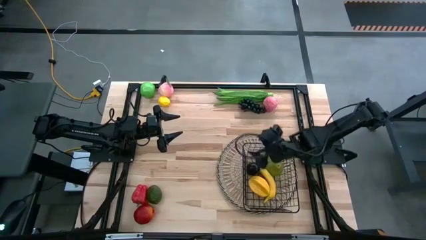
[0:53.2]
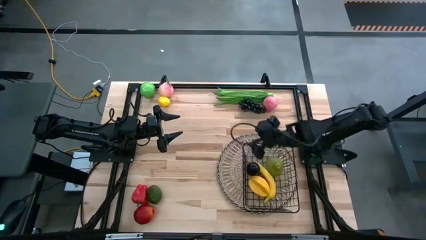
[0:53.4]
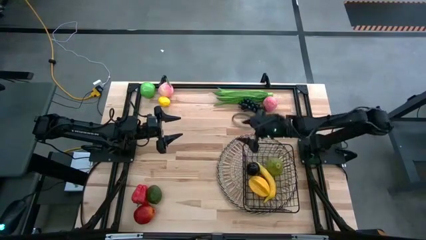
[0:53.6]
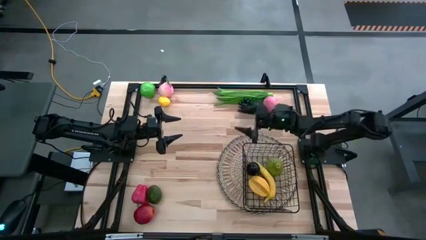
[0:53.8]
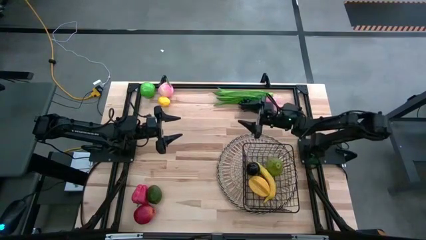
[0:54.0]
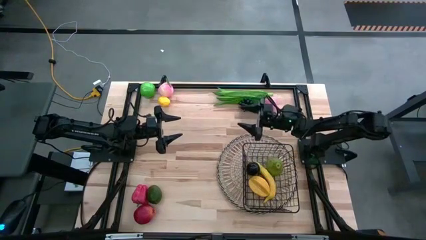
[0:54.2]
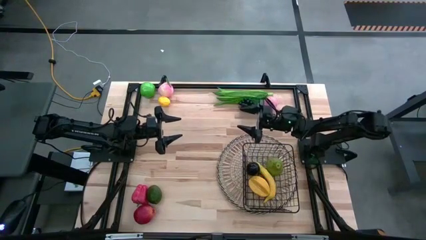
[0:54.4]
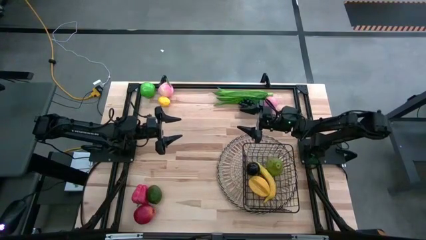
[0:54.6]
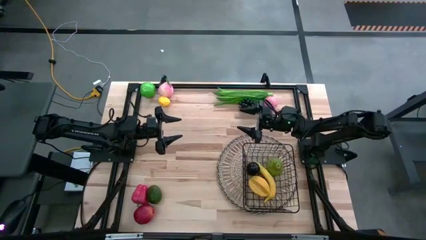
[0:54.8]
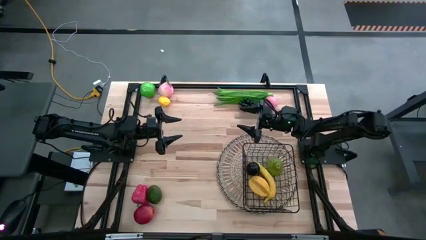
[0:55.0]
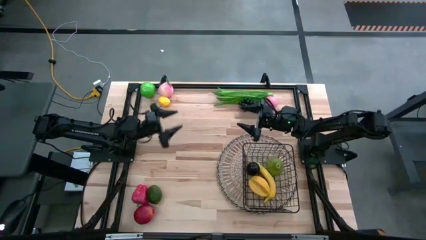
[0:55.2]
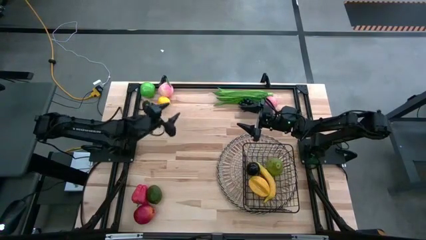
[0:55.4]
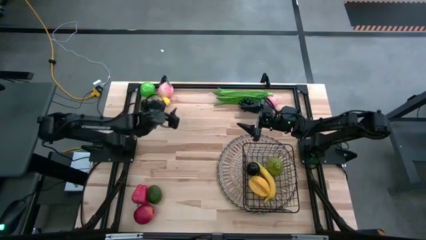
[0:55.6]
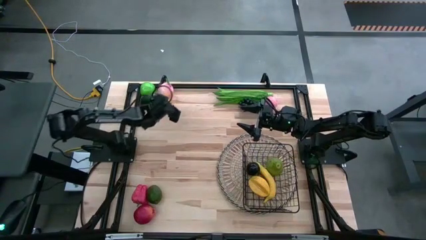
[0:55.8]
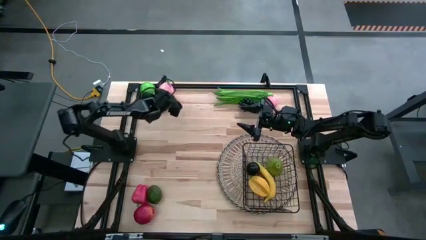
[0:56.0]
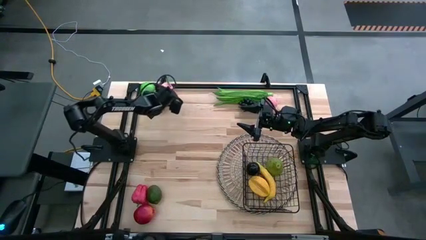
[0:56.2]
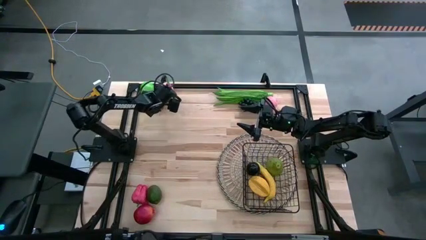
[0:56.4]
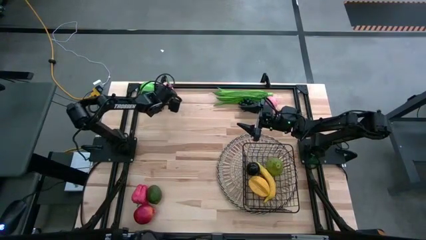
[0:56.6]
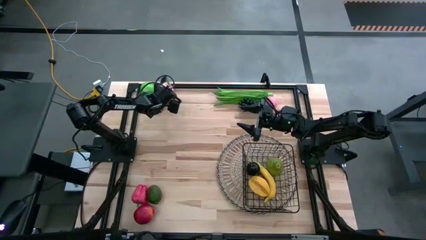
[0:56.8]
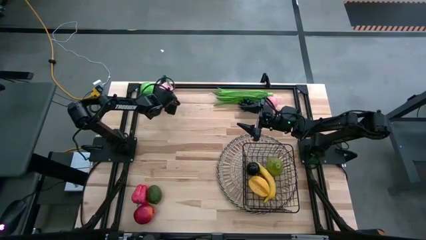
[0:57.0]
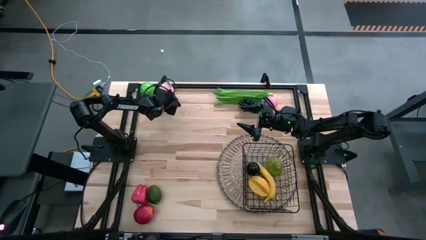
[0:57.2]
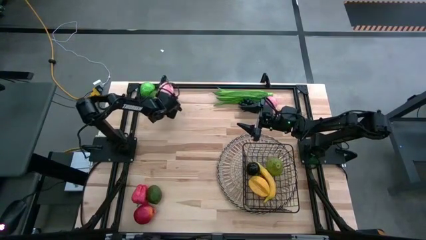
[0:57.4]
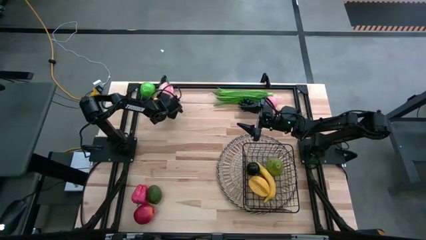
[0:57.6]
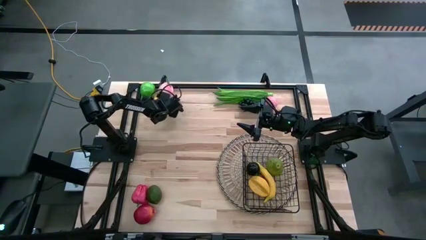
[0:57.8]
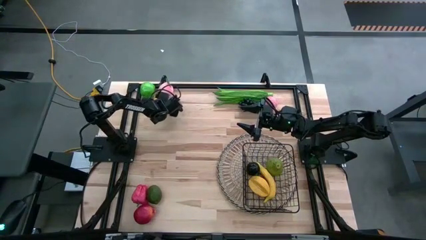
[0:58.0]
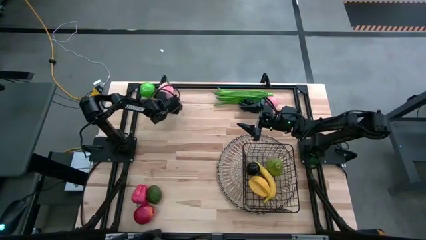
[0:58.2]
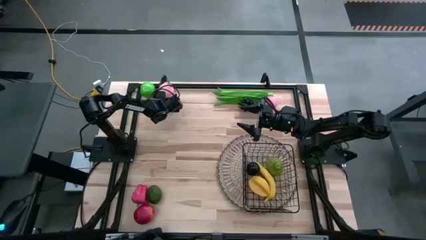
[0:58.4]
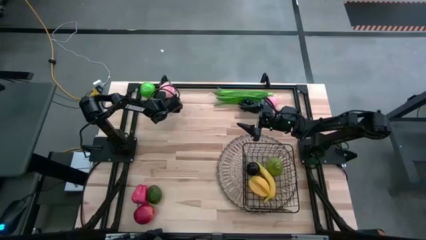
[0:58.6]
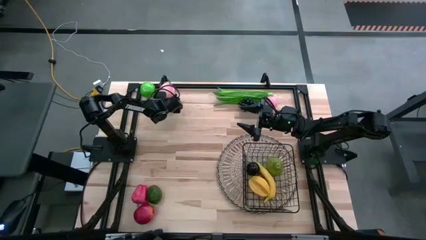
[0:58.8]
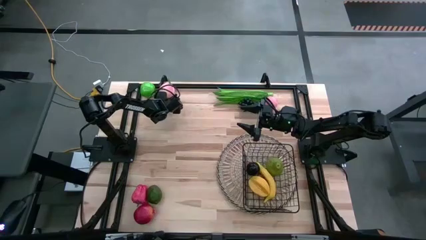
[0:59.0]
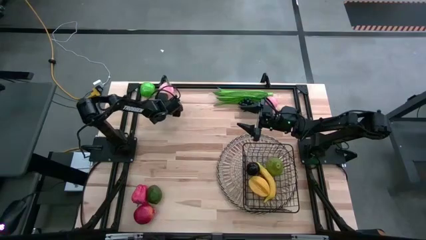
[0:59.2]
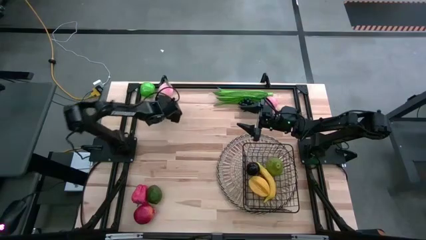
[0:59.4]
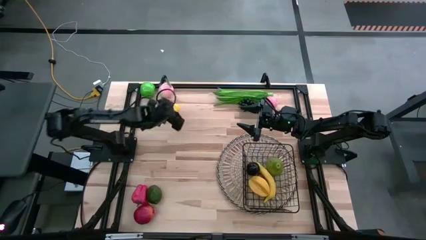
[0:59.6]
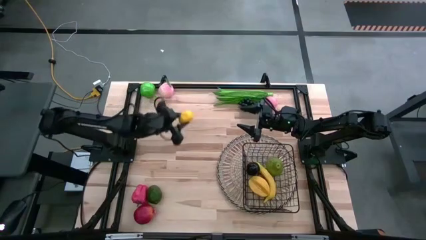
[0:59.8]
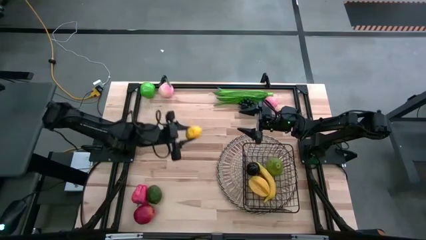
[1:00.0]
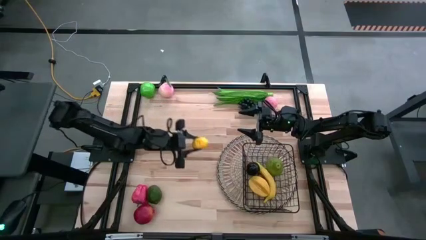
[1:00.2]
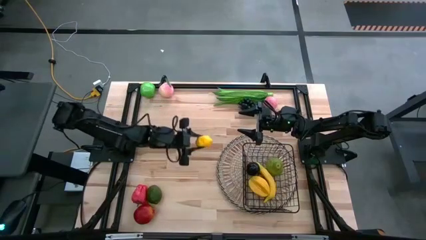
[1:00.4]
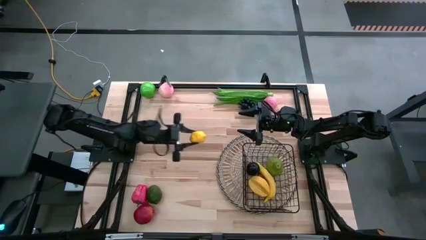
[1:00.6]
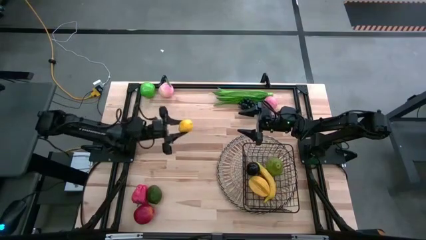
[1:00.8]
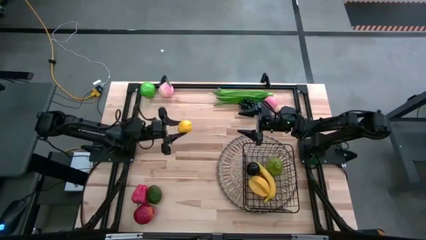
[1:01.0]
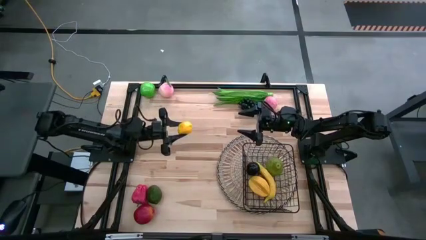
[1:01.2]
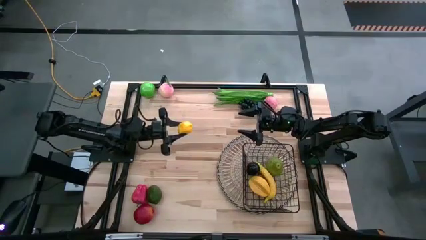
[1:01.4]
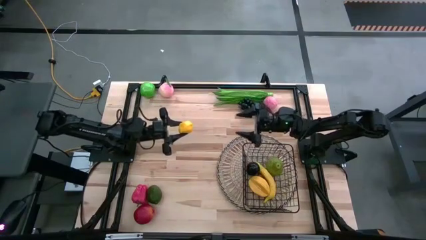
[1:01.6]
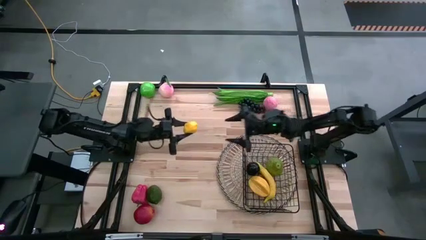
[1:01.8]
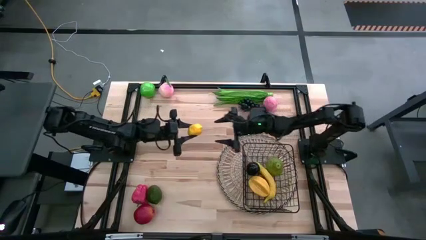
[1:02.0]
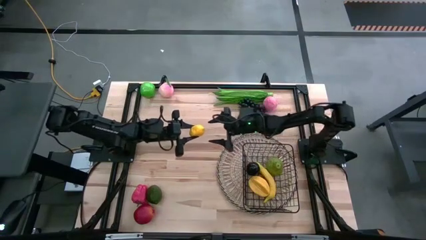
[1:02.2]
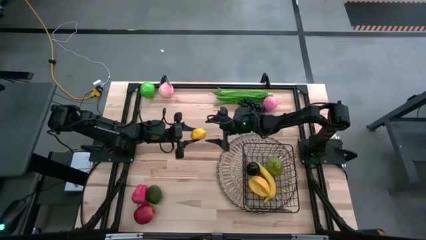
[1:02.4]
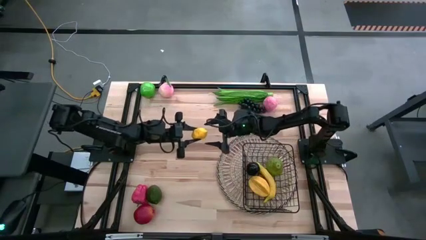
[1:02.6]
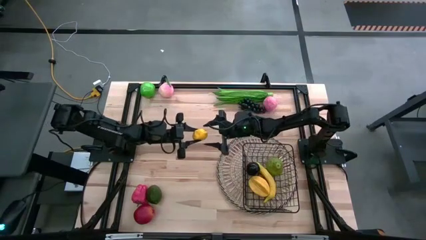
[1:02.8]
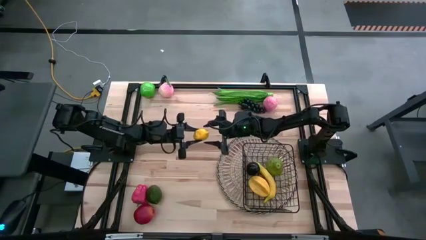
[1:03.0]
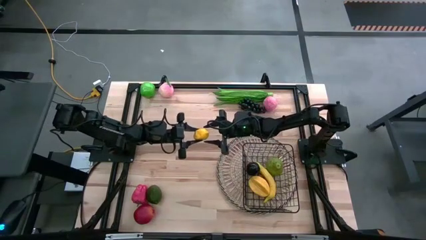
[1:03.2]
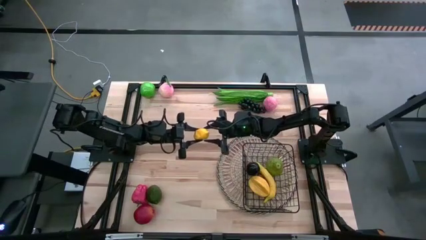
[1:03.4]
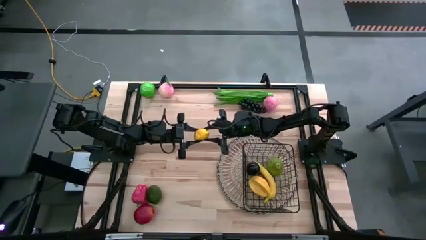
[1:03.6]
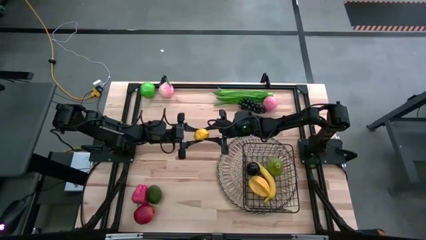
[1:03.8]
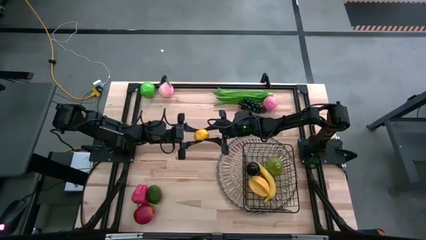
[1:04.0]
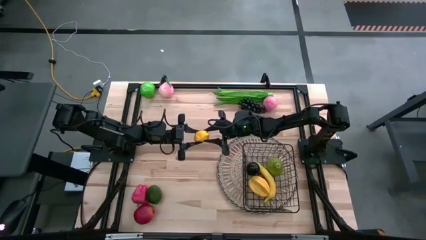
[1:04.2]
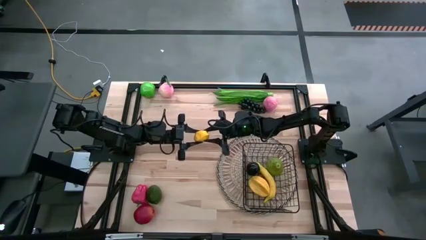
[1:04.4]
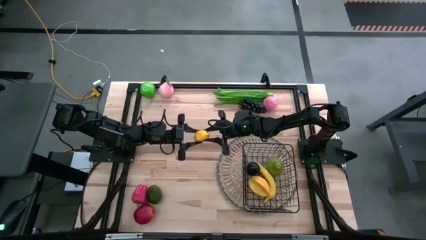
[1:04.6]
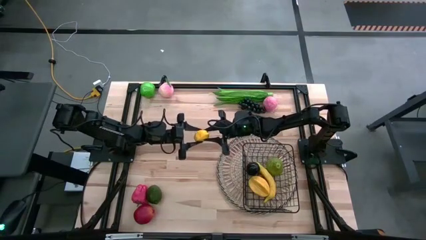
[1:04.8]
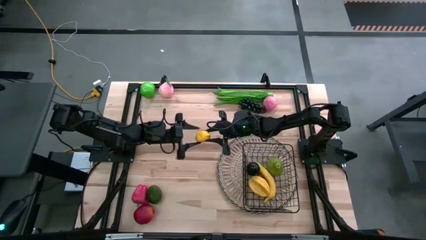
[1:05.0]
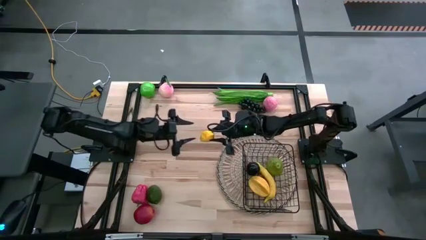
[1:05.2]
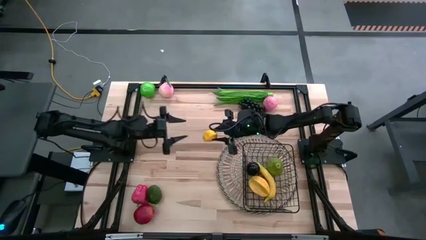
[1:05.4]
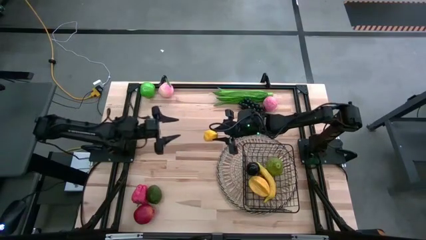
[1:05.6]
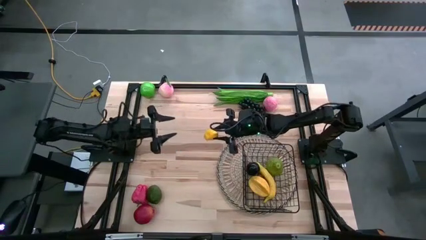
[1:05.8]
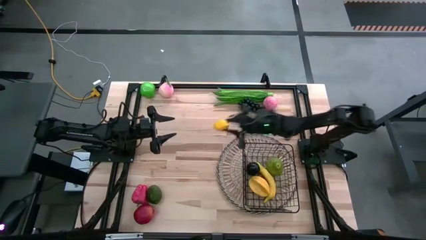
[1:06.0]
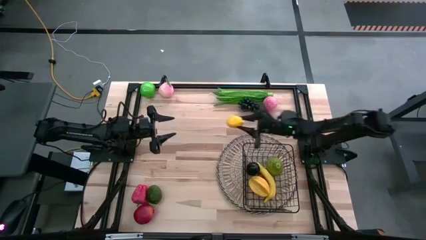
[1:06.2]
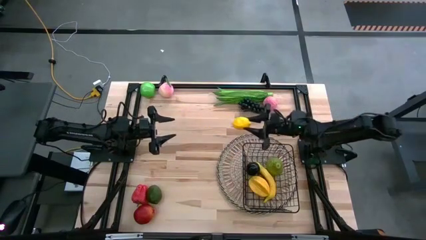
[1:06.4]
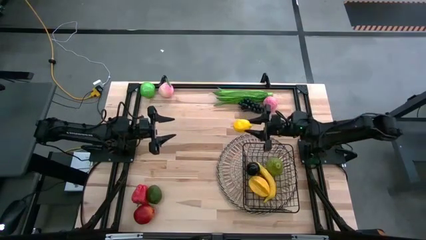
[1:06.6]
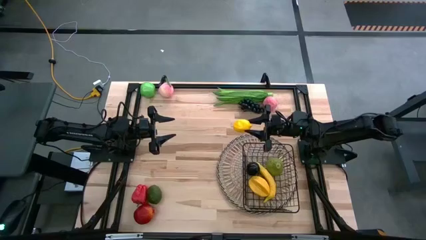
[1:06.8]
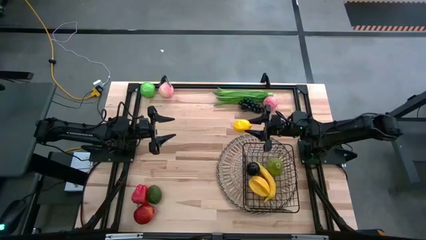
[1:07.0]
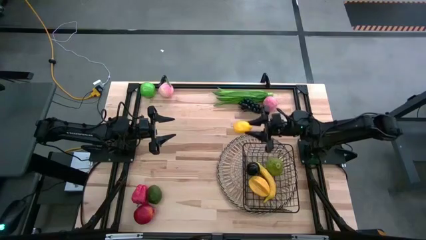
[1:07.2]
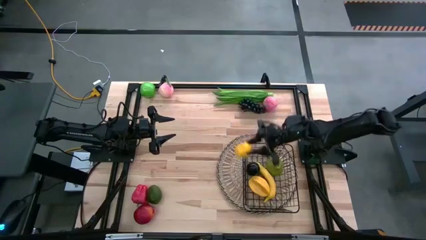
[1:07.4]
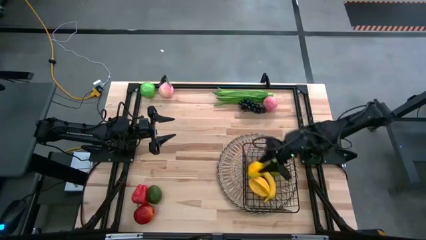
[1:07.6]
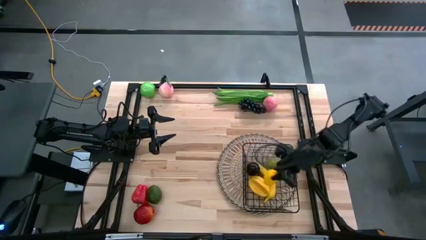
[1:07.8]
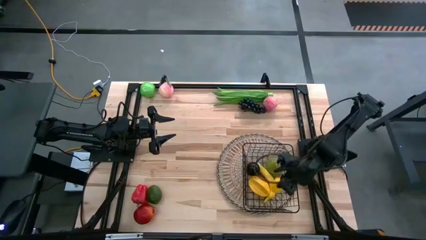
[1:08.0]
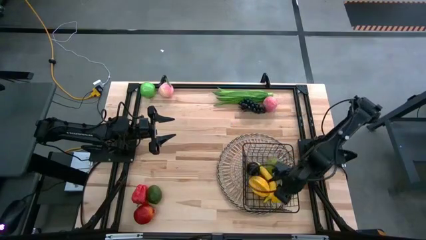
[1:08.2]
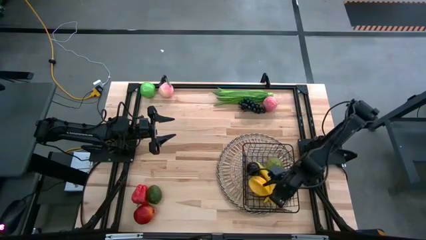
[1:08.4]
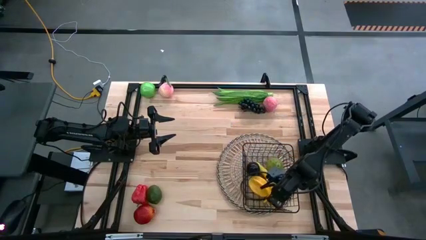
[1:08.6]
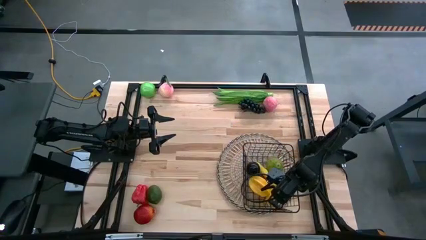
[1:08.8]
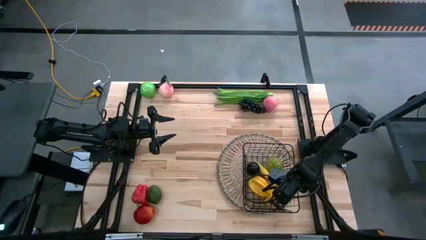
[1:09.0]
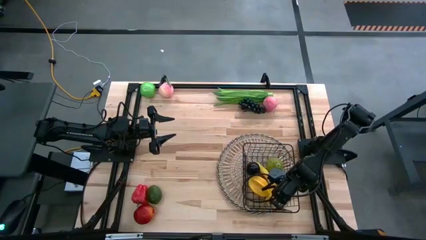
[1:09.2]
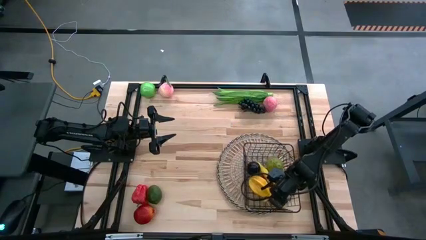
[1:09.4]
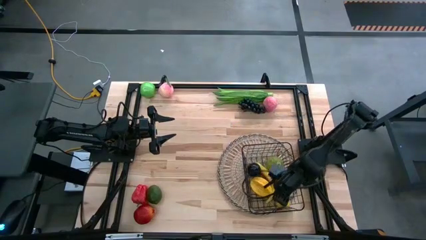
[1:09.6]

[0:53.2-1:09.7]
Task: Build produce basket
Put the yellow lemon into the wire basket
